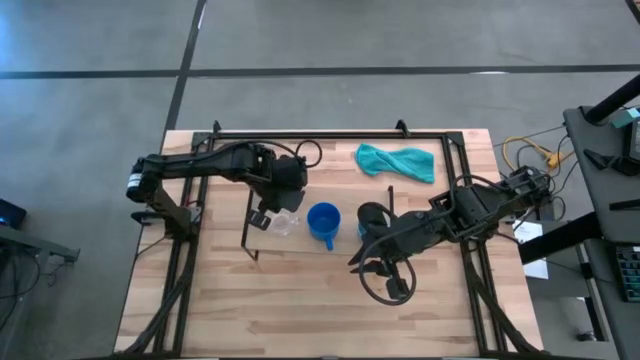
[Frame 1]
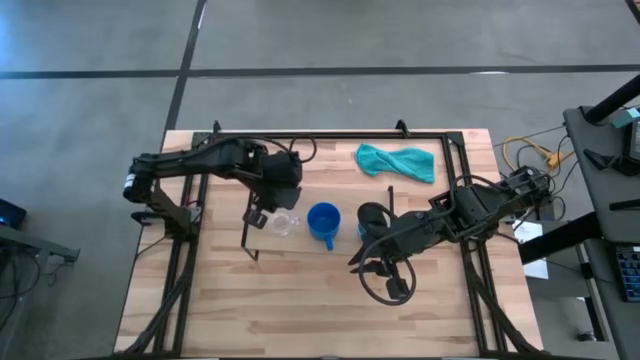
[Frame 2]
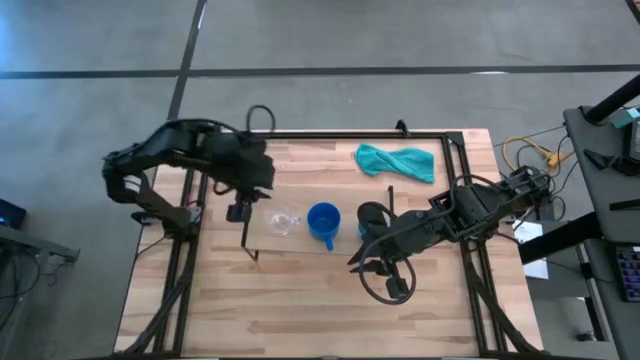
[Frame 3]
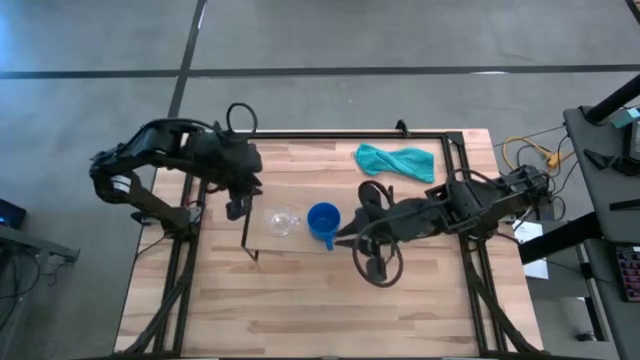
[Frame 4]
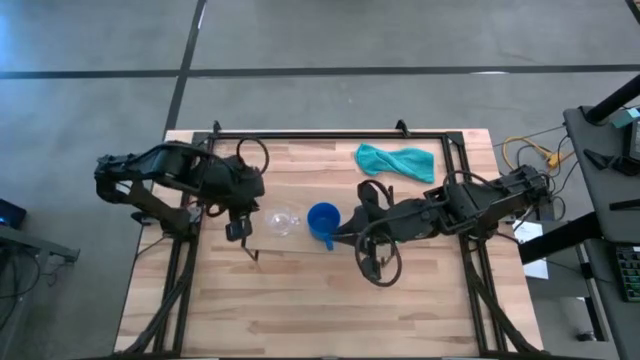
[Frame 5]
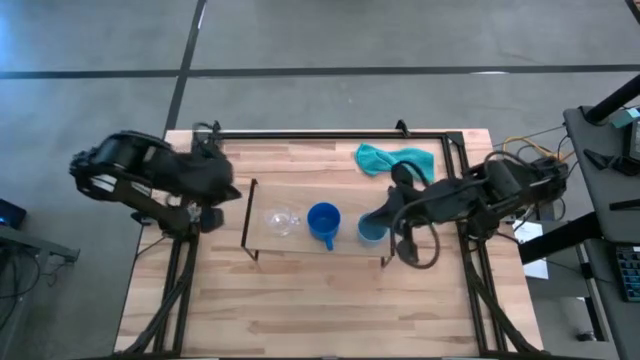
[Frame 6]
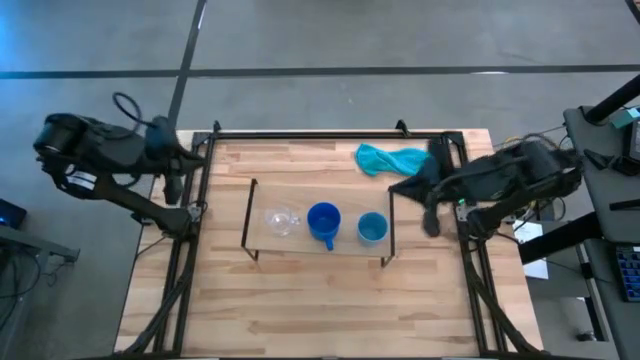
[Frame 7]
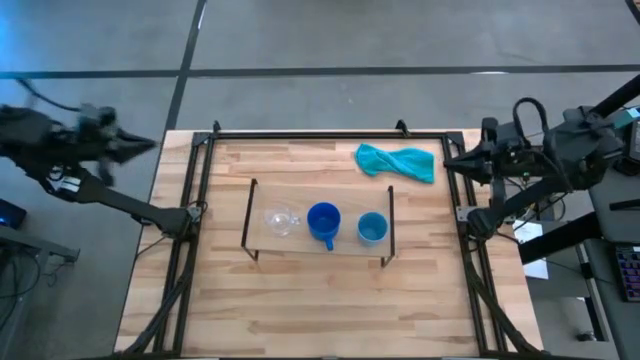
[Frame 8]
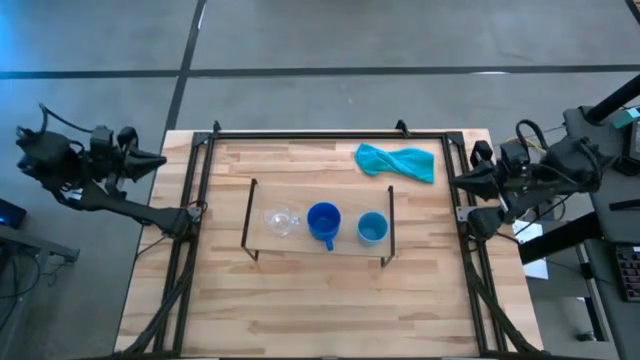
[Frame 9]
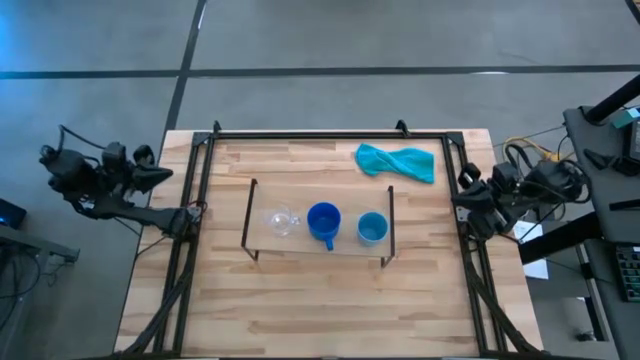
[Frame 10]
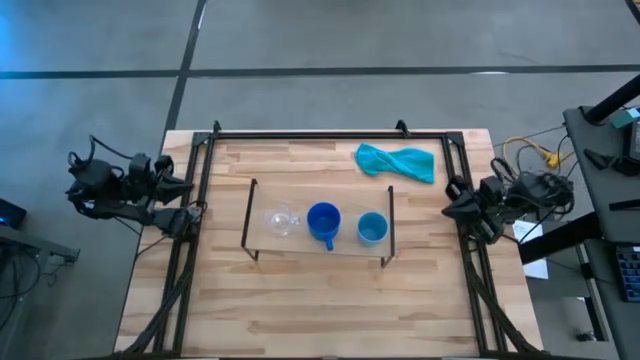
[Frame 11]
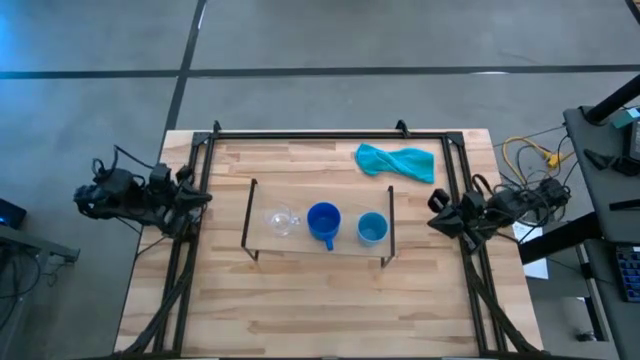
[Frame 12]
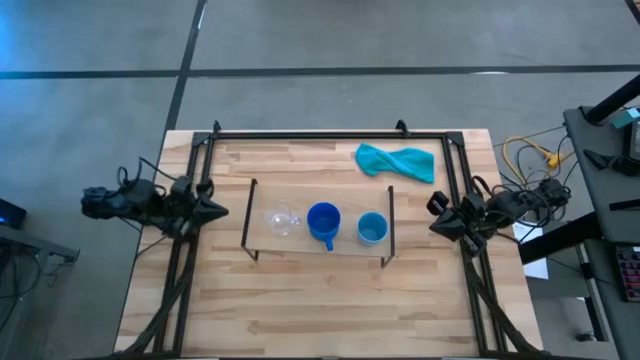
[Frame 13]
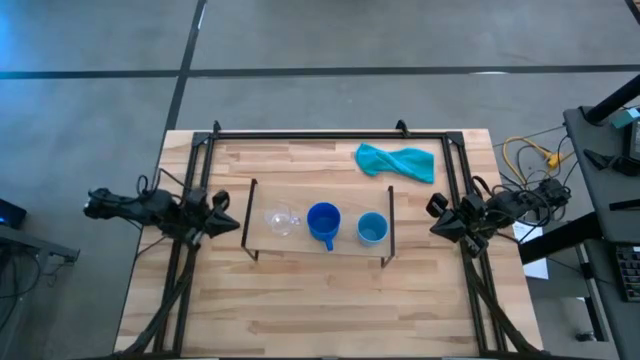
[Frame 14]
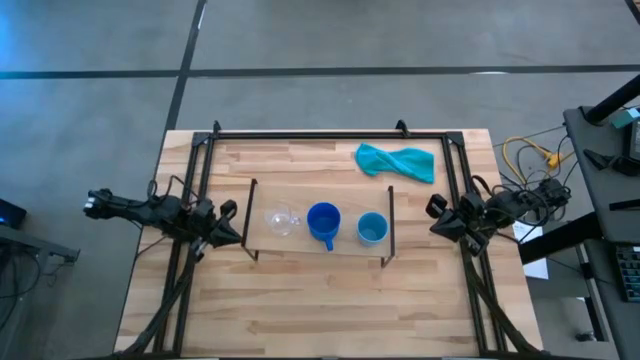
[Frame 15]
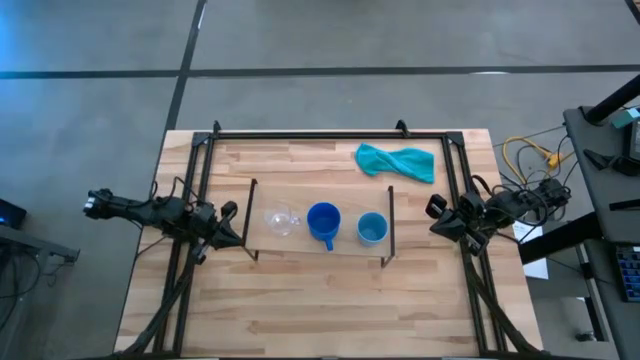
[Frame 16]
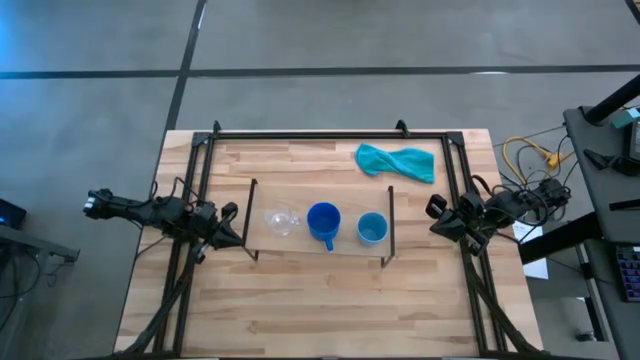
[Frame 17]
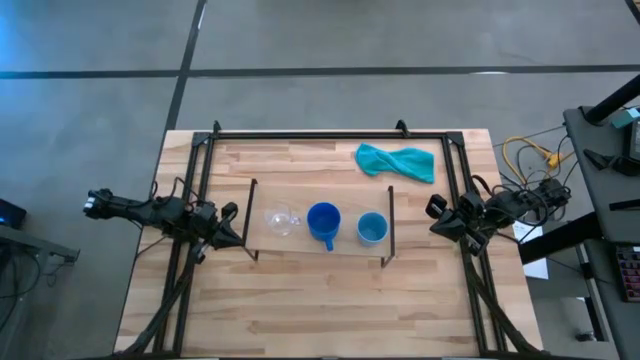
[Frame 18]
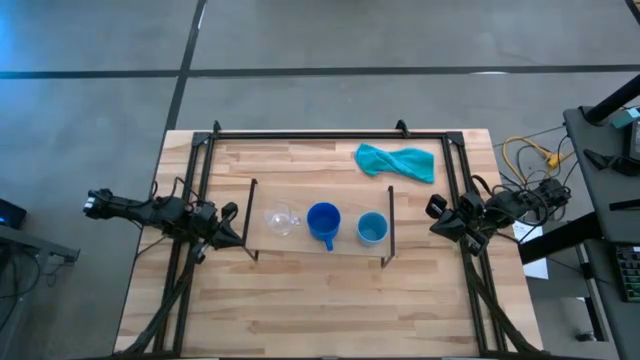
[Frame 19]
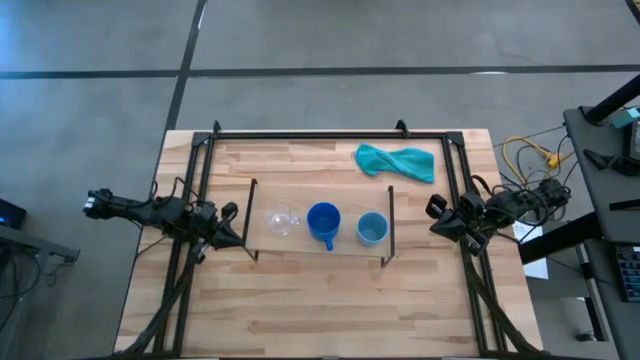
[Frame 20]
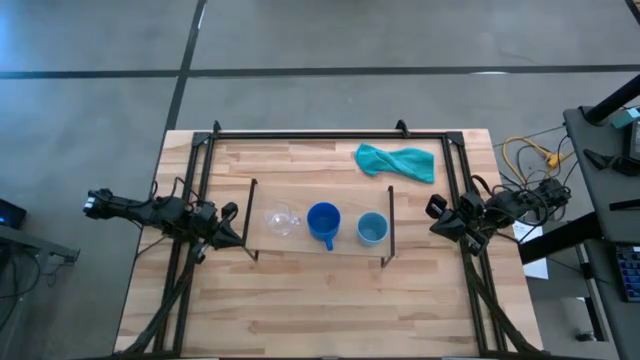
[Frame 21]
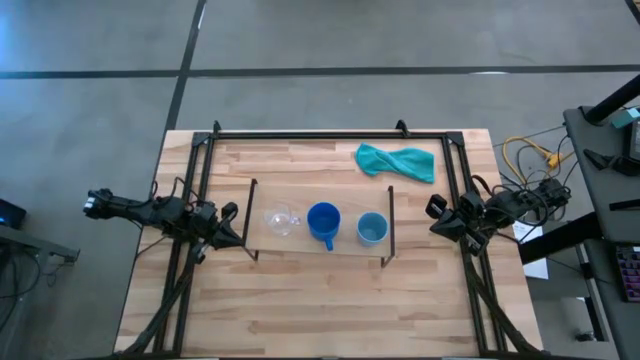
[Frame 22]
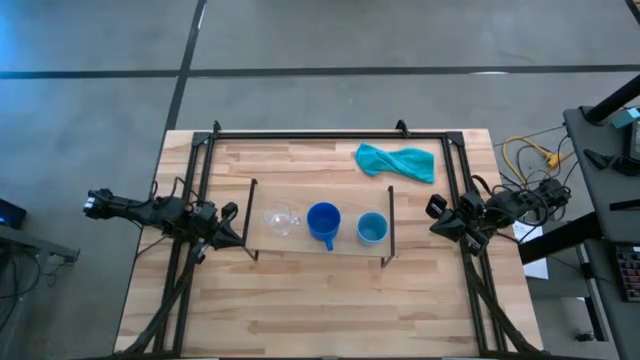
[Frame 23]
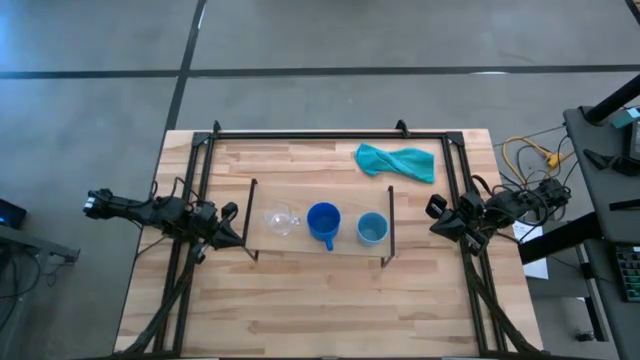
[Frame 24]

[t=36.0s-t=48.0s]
Task: Stack small to large cups/mugs on shelf
Return to Home Position

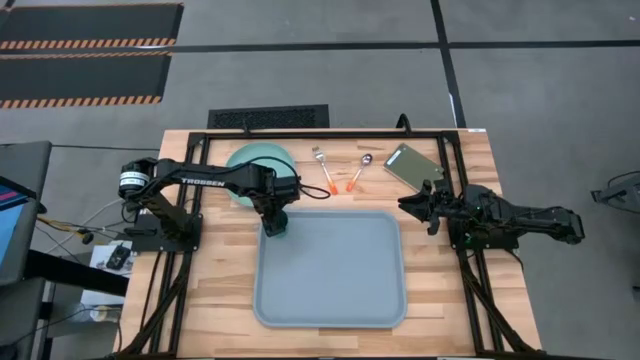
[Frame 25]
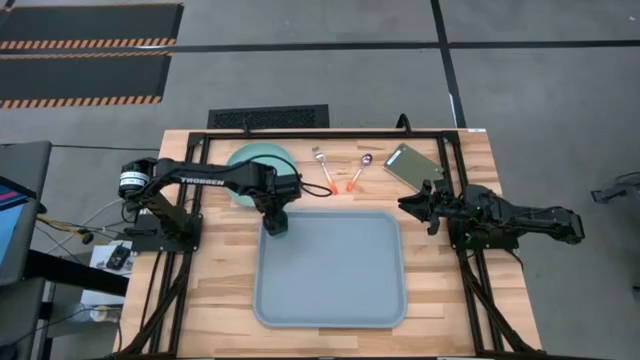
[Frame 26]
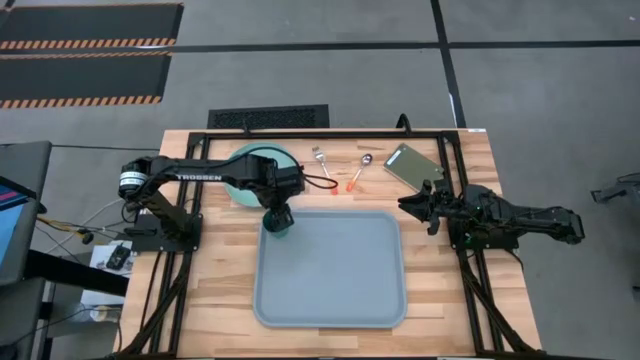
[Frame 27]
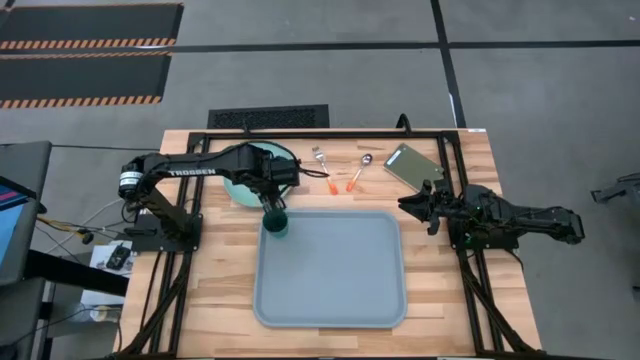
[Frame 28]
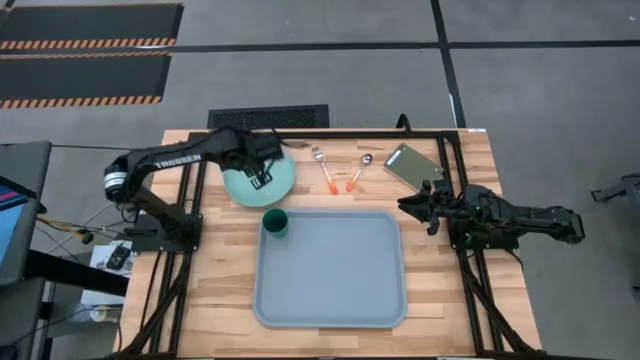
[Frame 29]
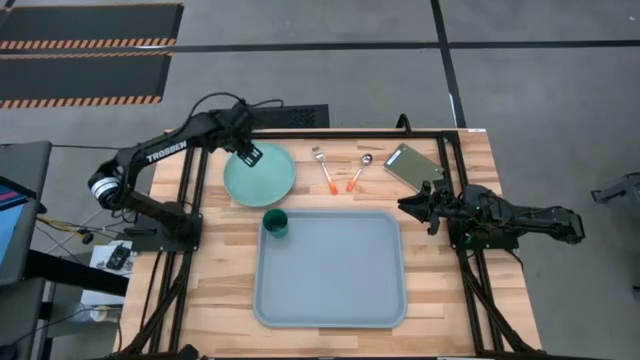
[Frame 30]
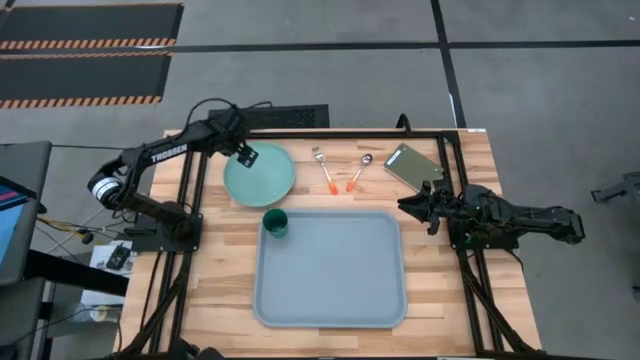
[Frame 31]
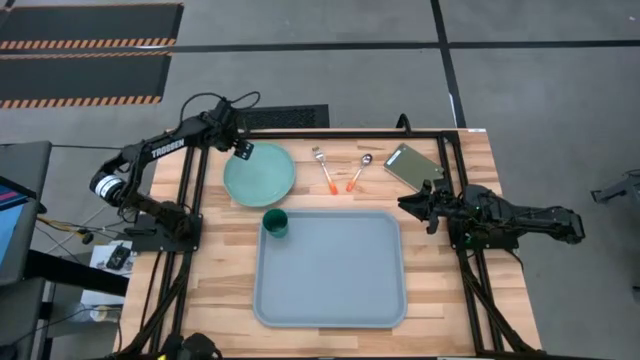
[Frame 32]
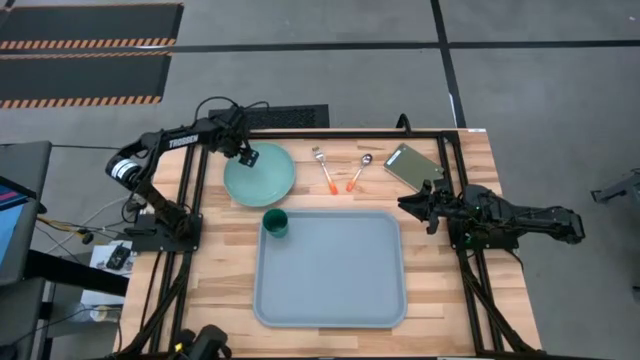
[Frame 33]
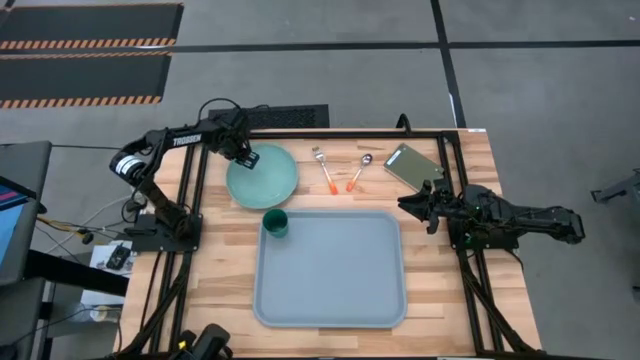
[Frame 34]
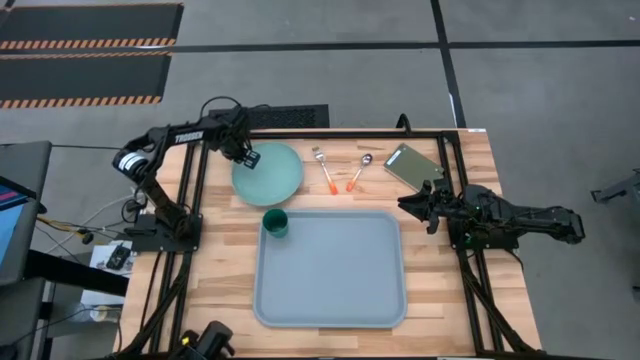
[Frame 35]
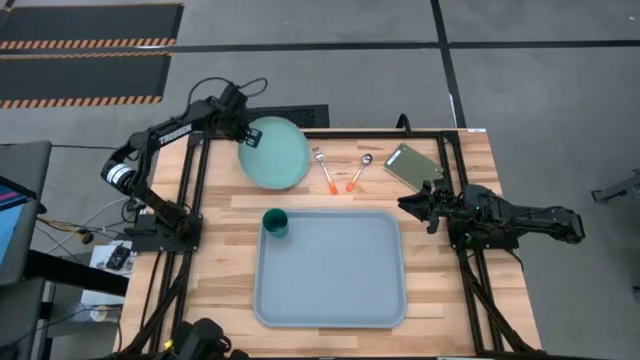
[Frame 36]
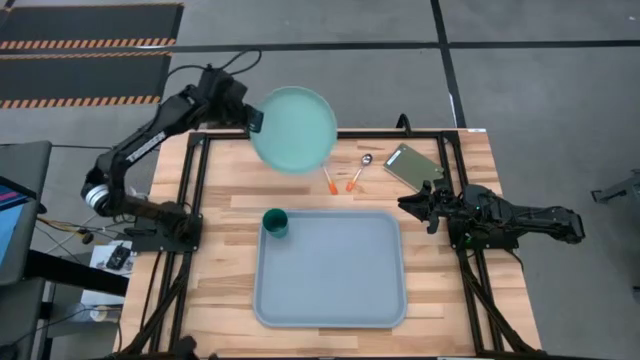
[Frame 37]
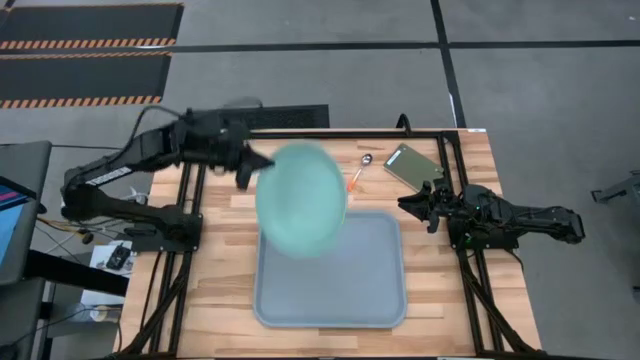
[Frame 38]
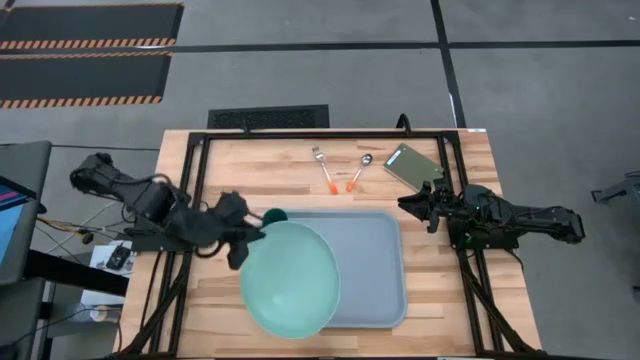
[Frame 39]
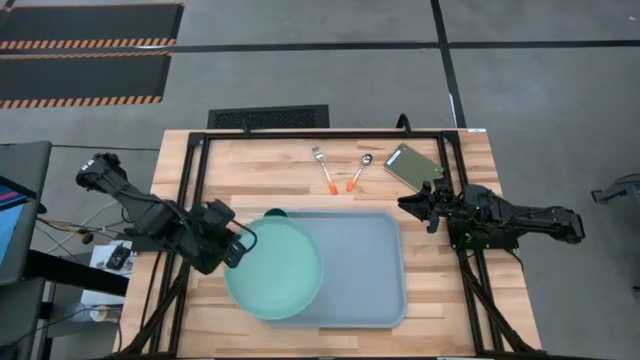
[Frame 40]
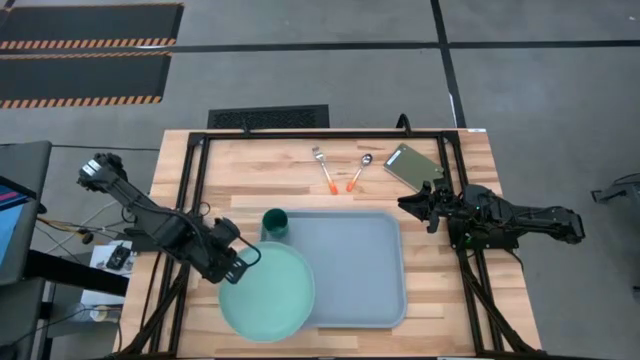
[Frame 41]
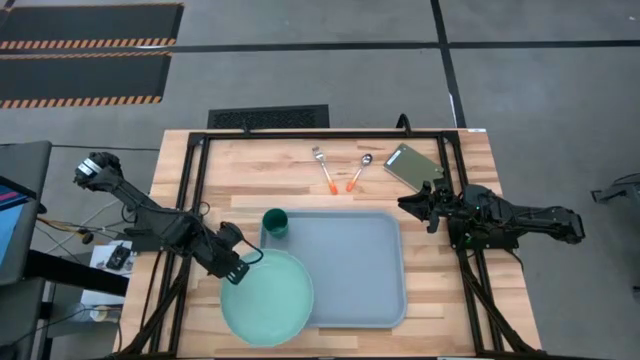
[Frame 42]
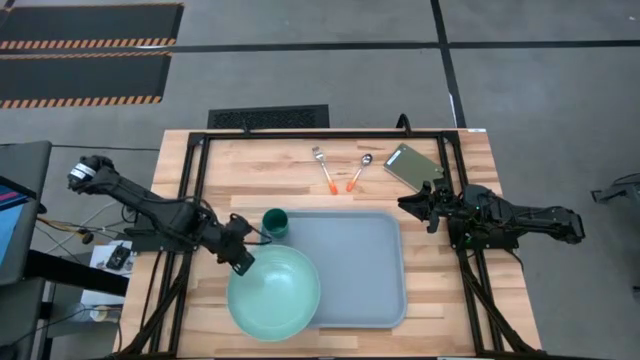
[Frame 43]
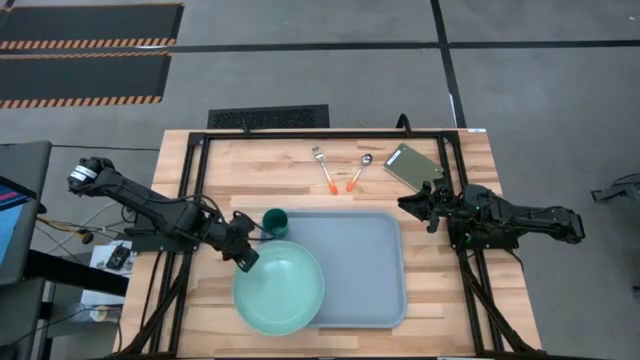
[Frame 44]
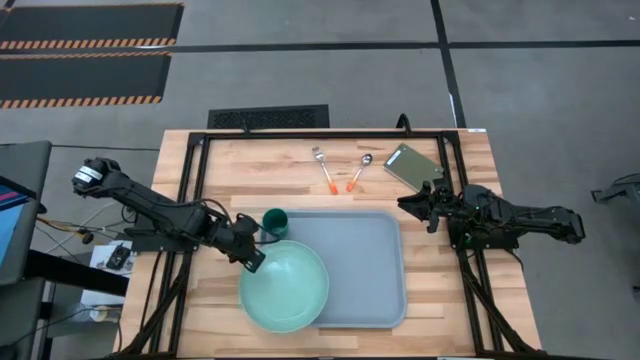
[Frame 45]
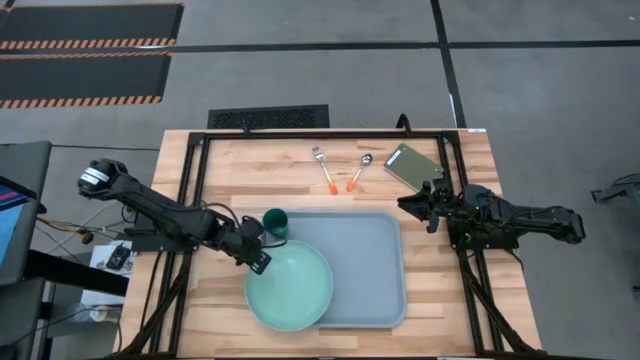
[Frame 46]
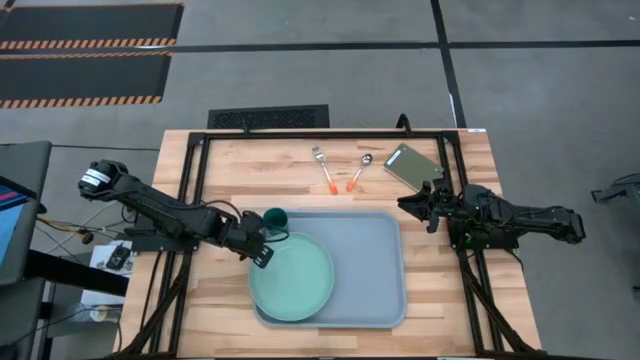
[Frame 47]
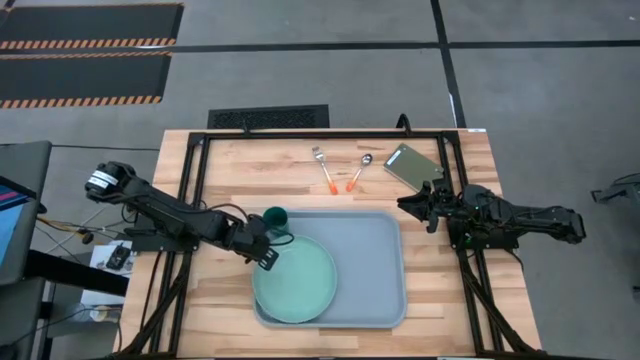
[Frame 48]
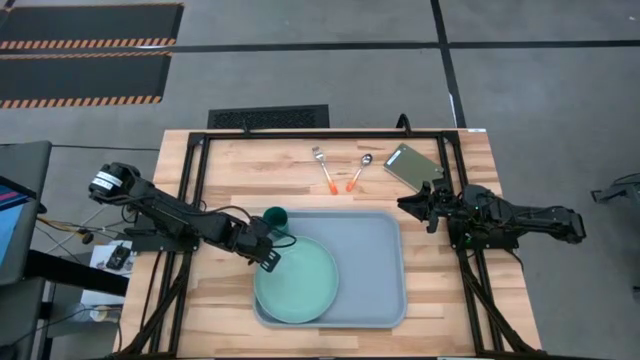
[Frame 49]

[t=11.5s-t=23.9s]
Task: Pick and place plate/cup/fork/spoon on tray
Put the green plate on the gray tray to the bottom of the green cup
